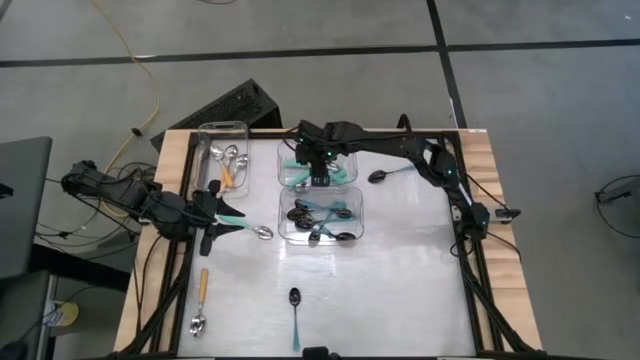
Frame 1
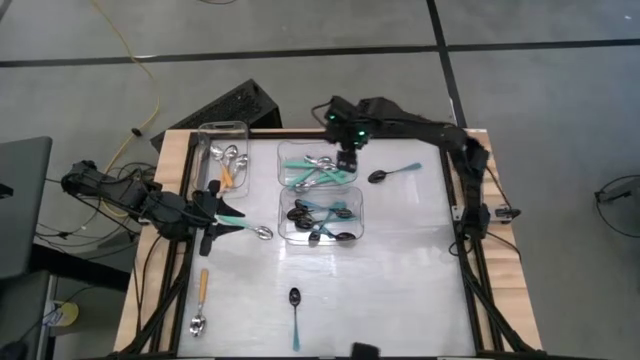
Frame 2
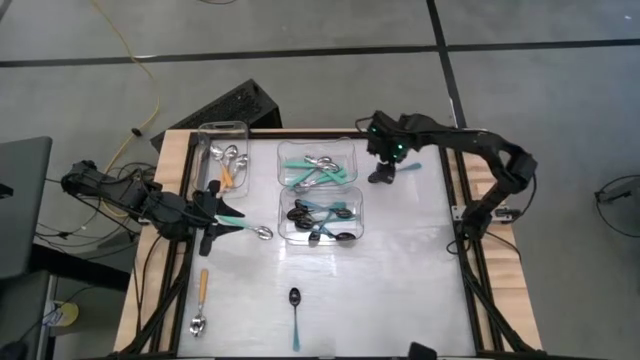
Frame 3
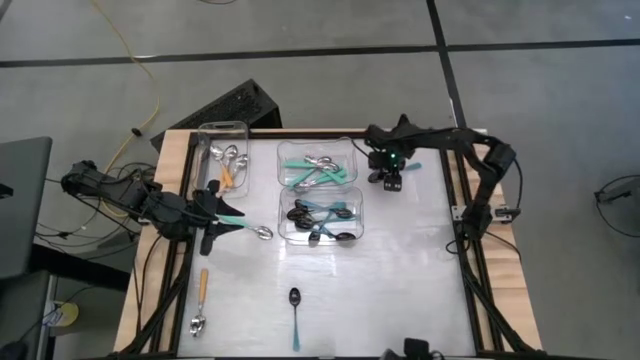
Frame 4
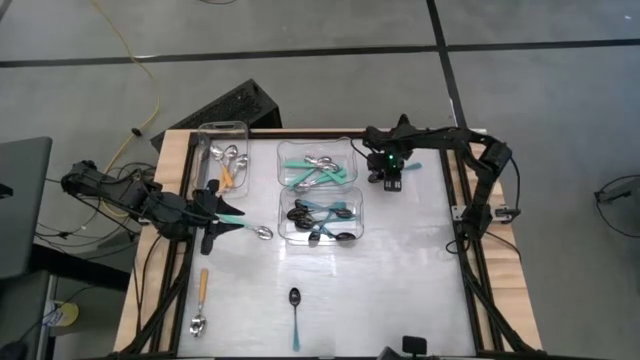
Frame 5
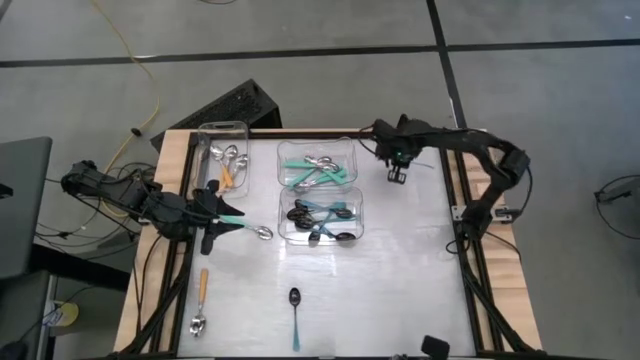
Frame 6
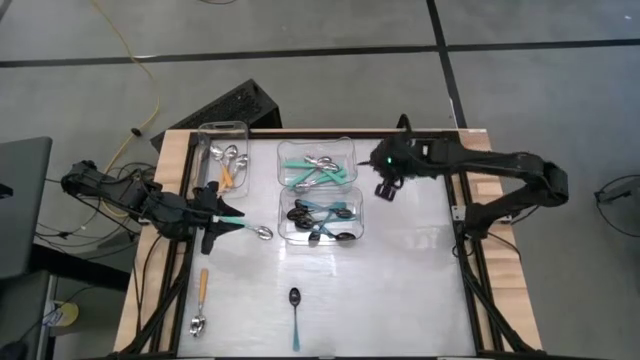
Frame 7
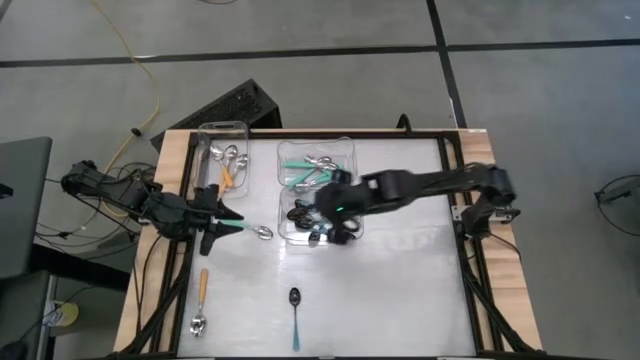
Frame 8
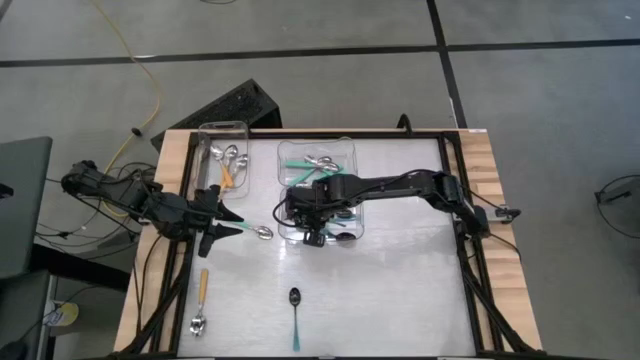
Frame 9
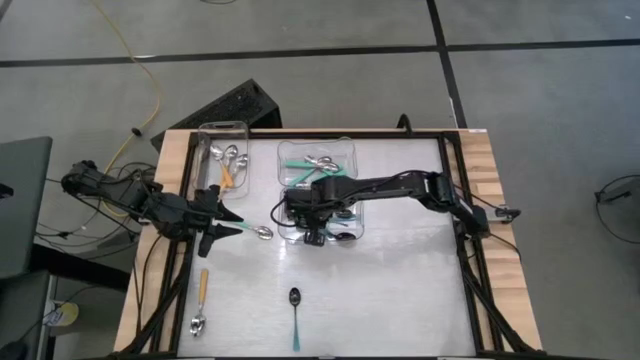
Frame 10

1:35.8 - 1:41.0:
Task: Sort silverware by color (type)
Put the blue spoon into the bottom transparent bin

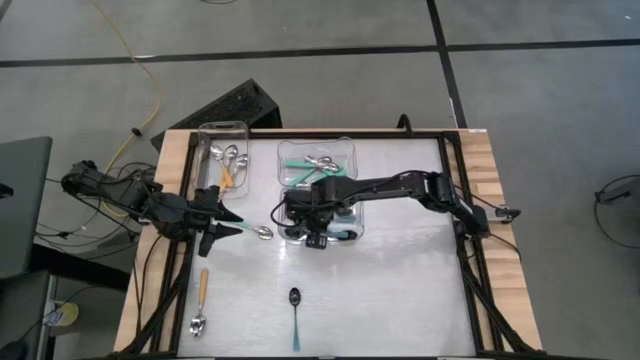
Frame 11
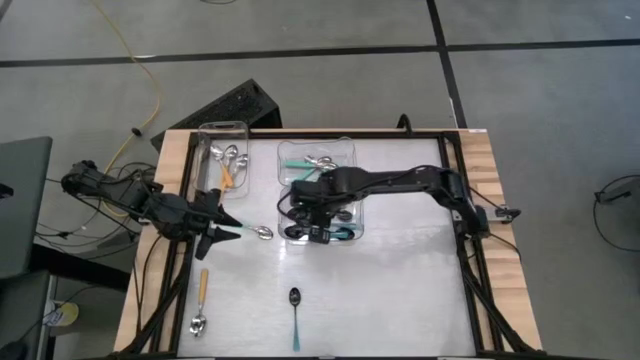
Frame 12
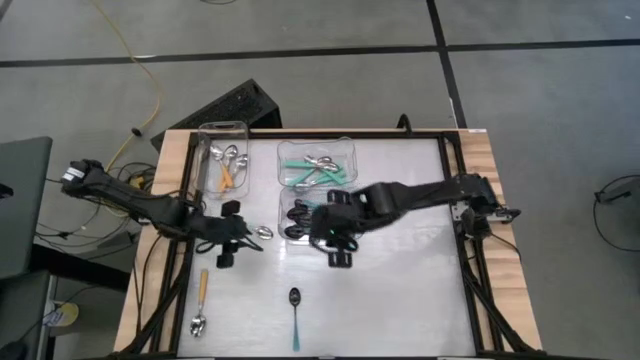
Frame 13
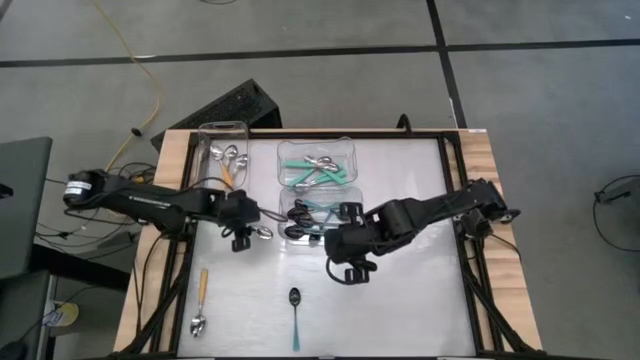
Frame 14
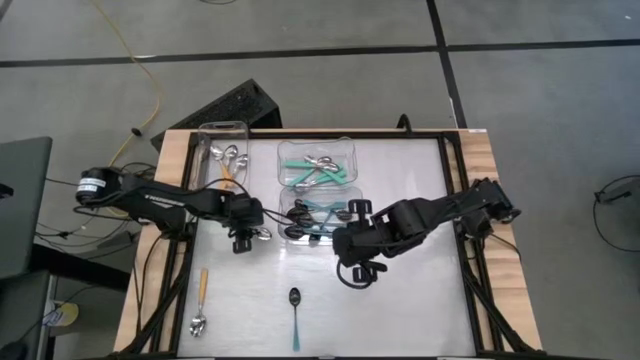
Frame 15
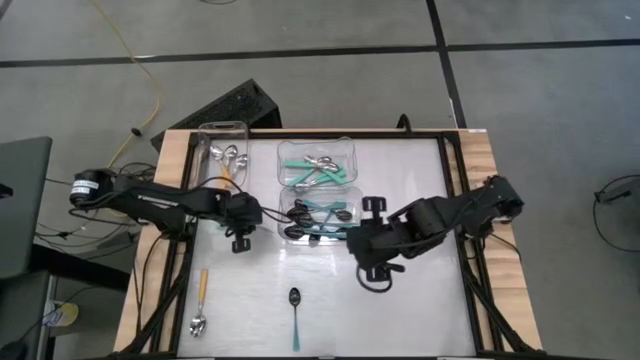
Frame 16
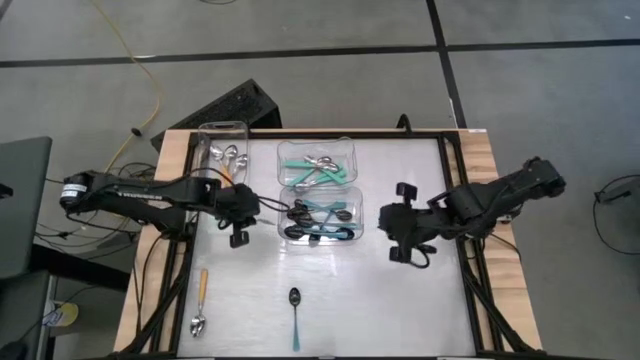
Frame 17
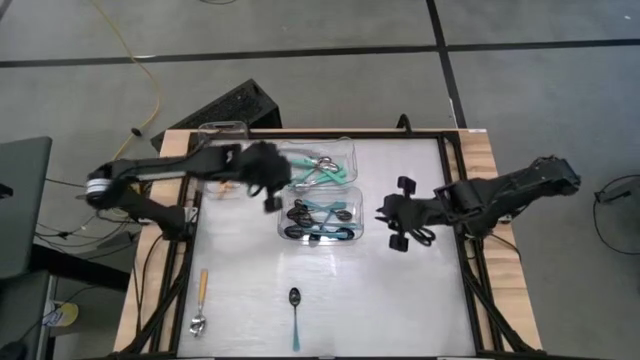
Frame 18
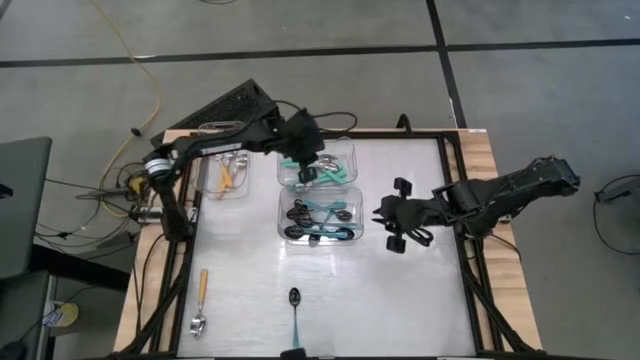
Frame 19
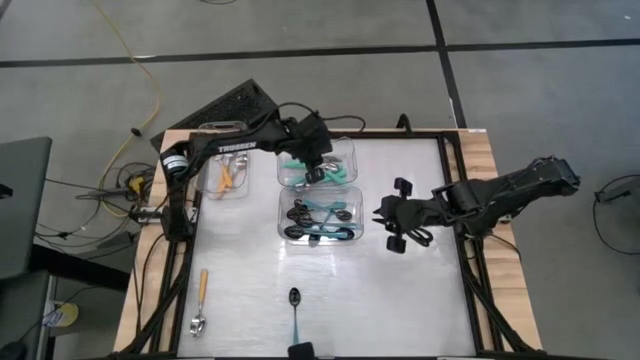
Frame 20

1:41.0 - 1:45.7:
Put the green spoon into the top right transparent bin

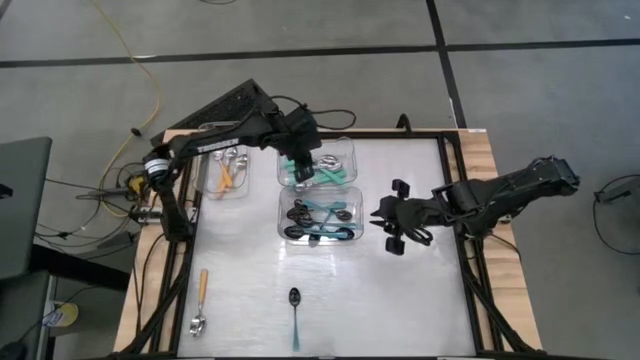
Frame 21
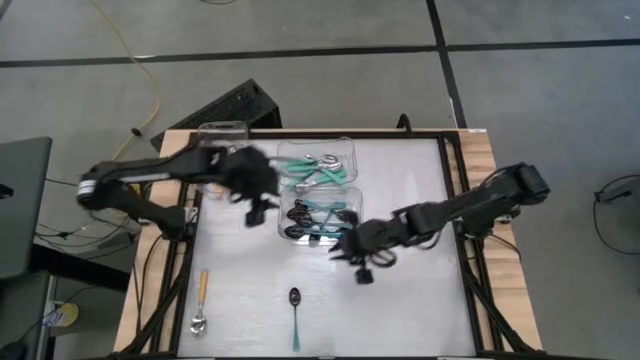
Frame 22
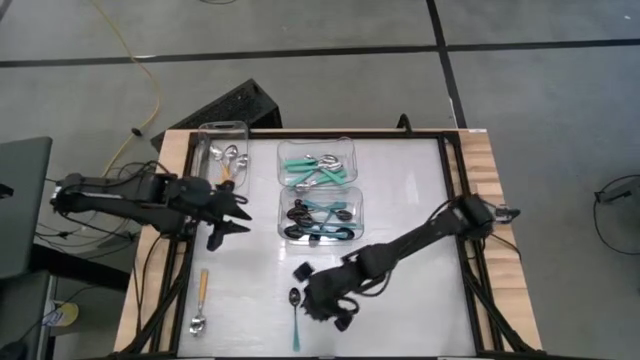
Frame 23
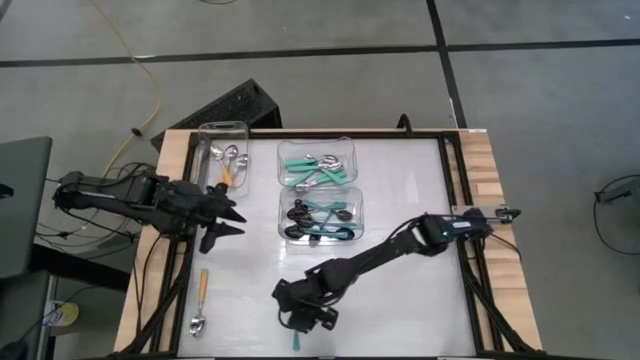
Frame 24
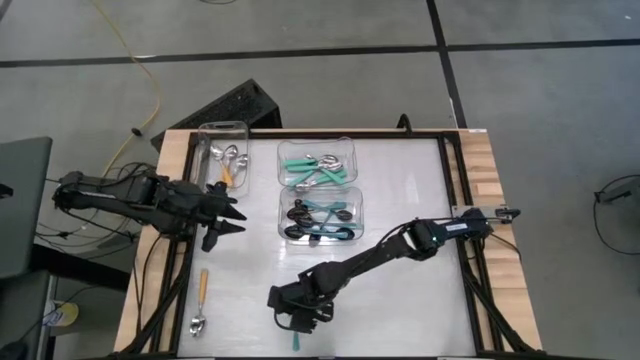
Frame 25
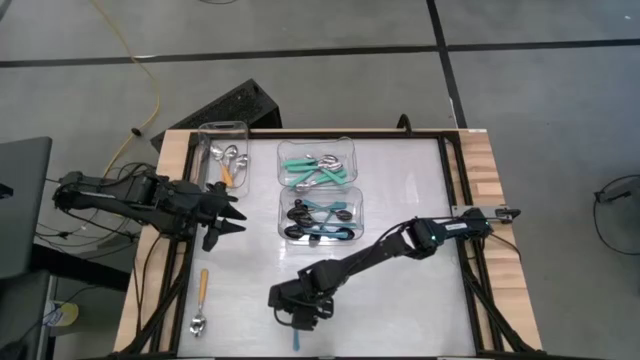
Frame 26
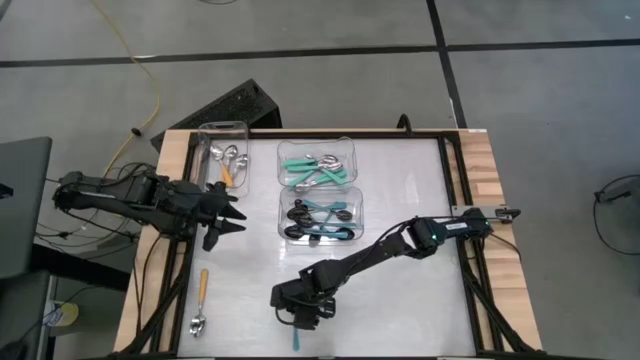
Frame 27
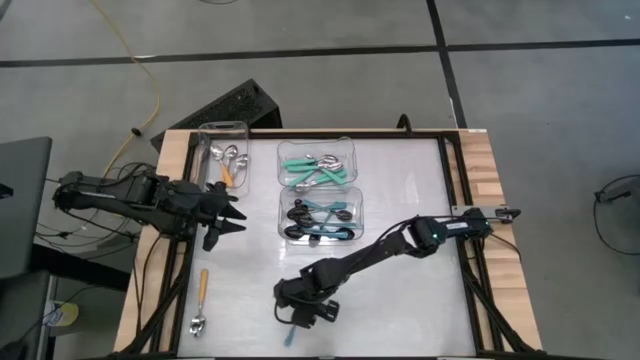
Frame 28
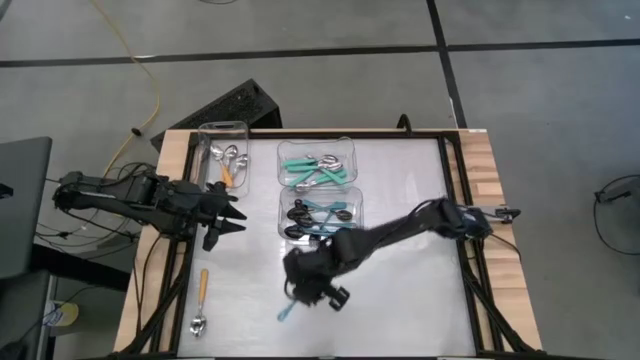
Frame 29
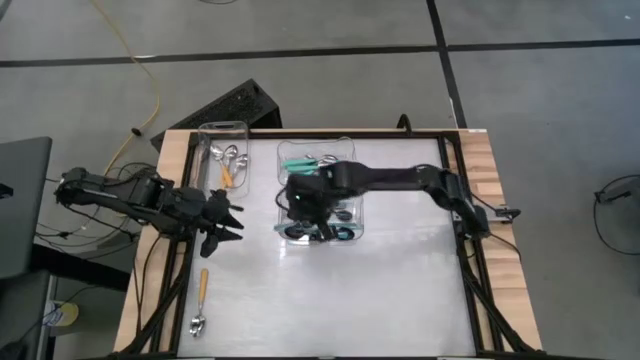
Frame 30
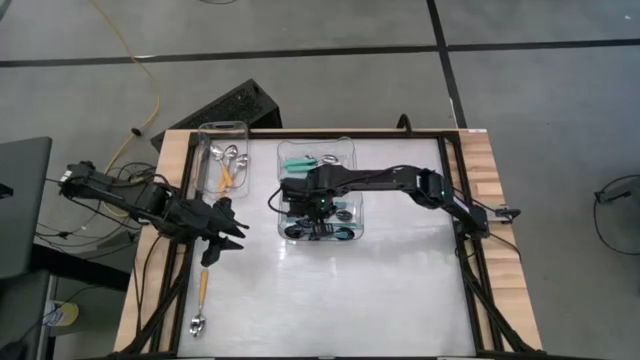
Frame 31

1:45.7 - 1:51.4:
Put the blue spoon into the bottom transparent bin

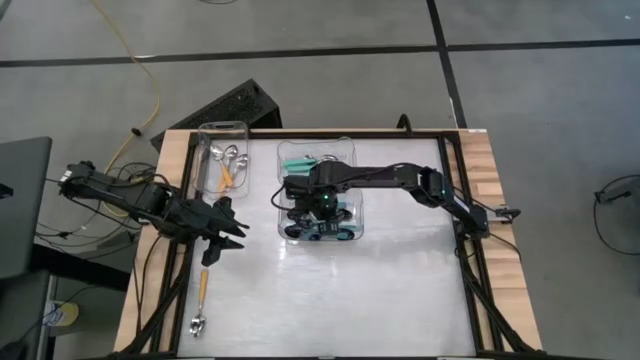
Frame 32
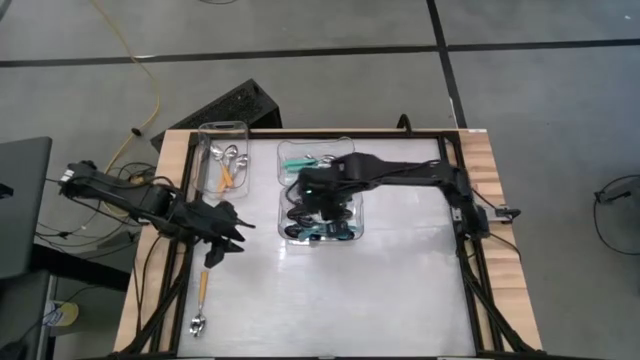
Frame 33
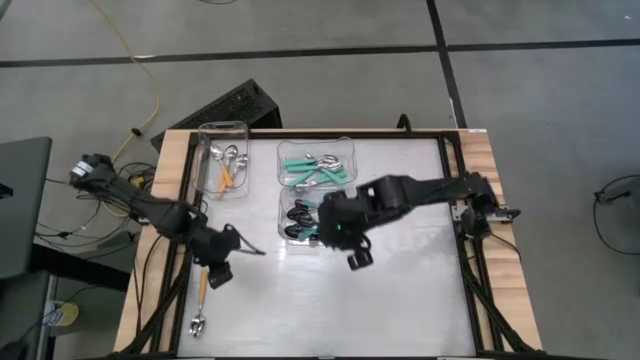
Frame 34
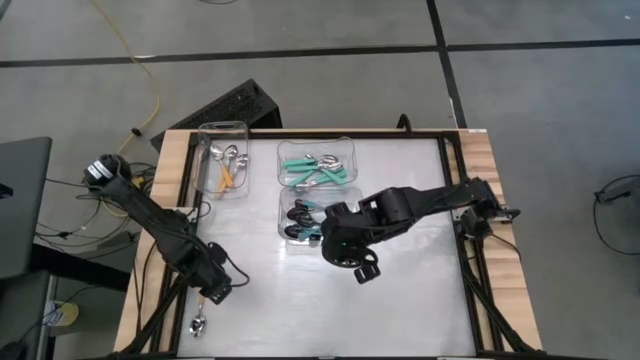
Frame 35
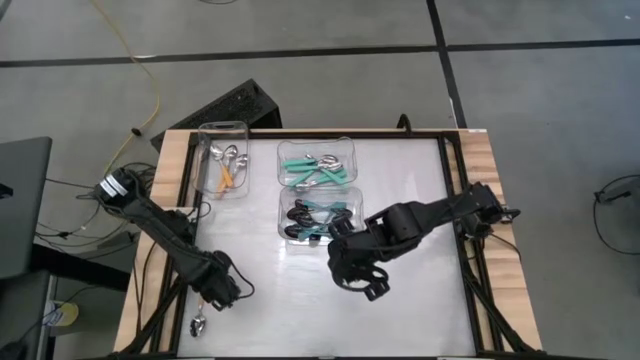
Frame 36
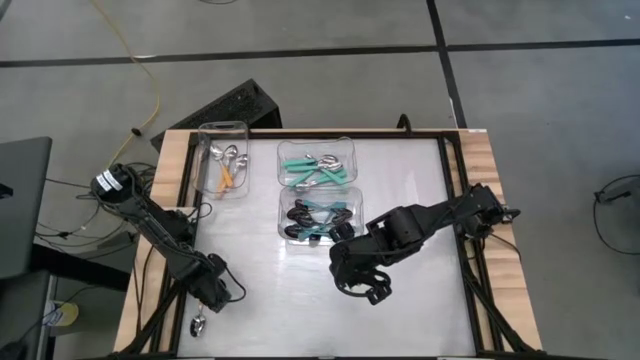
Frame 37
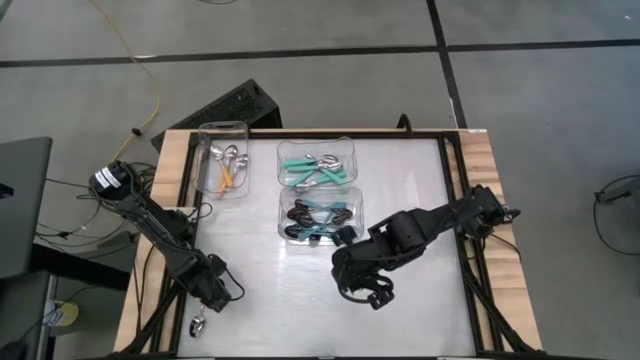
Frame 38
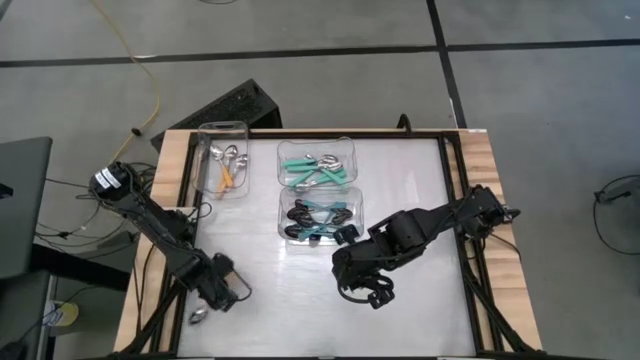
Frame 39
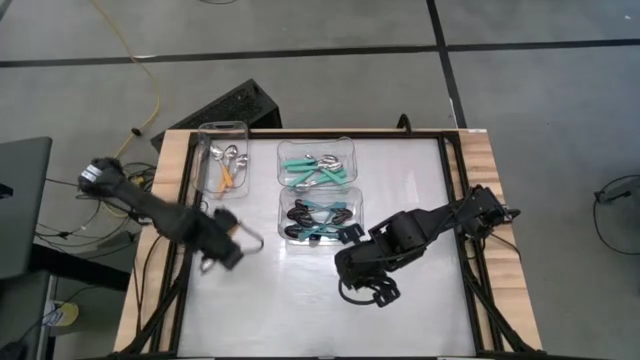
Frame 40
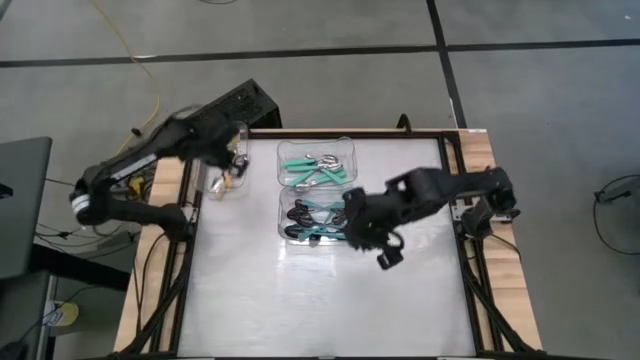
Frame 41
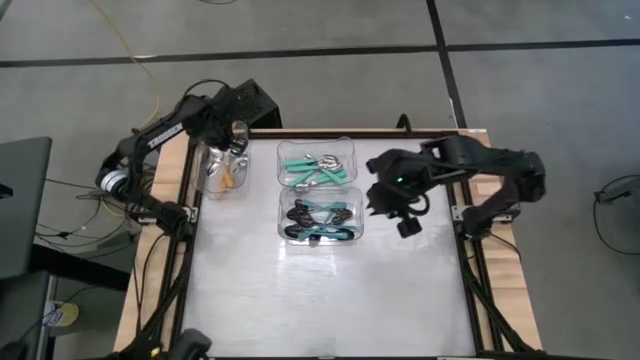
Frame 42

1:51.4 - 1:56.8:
Put the yellow spoon into the top left transparent bin
